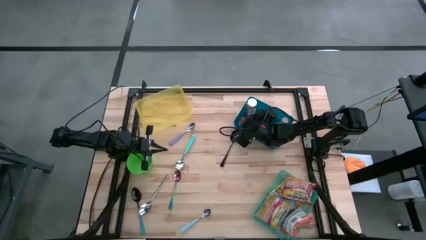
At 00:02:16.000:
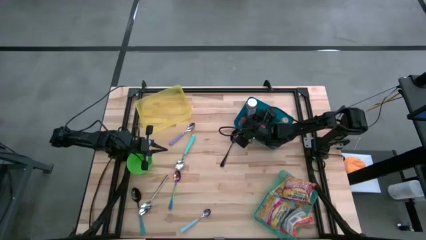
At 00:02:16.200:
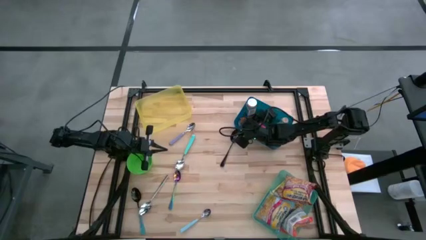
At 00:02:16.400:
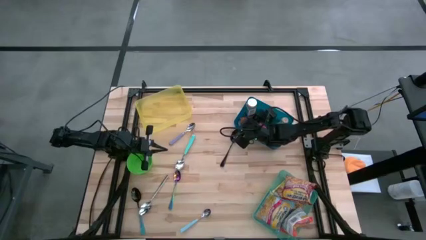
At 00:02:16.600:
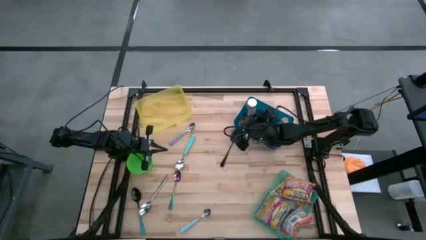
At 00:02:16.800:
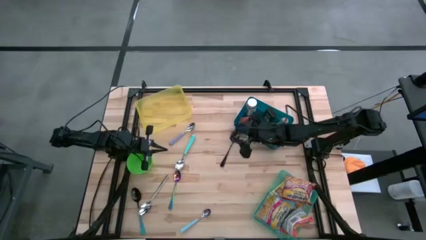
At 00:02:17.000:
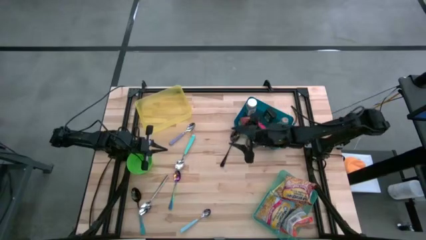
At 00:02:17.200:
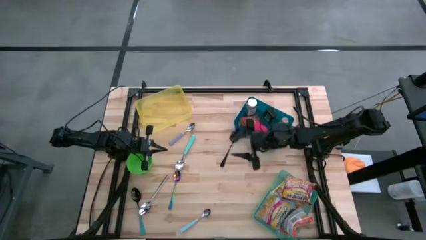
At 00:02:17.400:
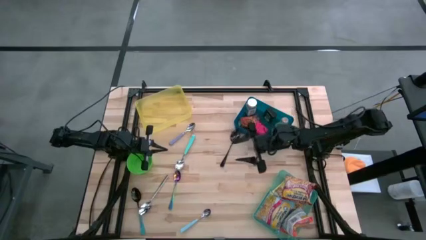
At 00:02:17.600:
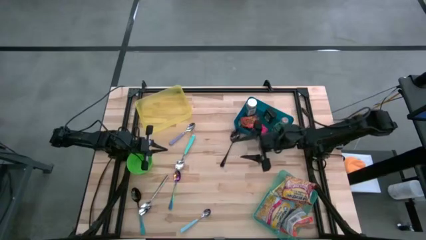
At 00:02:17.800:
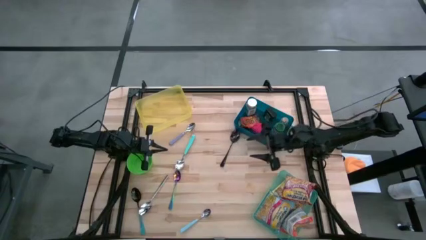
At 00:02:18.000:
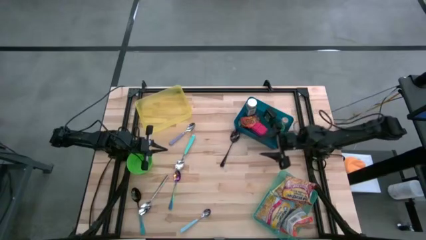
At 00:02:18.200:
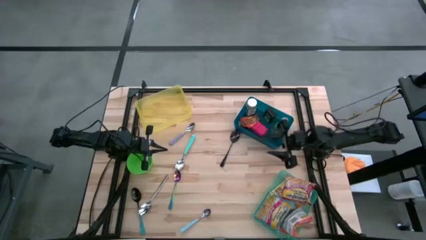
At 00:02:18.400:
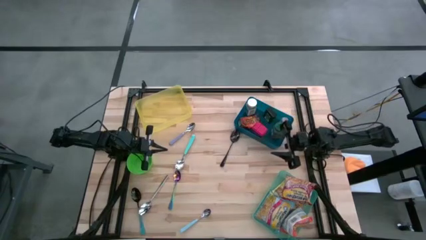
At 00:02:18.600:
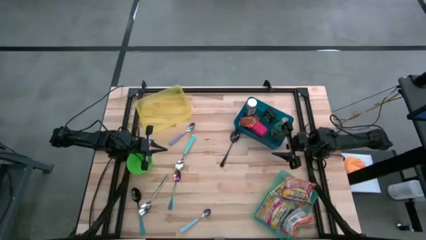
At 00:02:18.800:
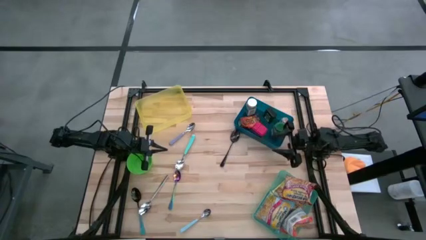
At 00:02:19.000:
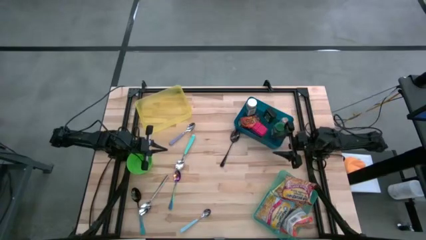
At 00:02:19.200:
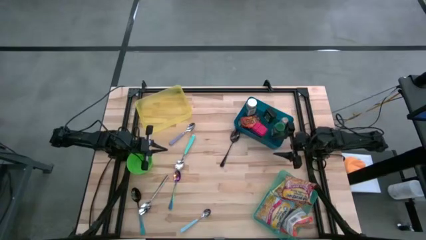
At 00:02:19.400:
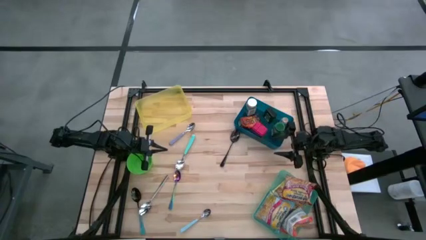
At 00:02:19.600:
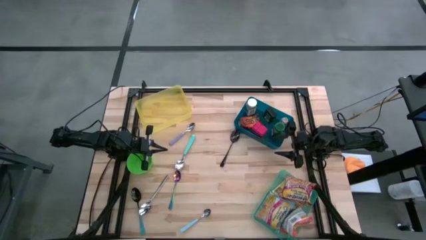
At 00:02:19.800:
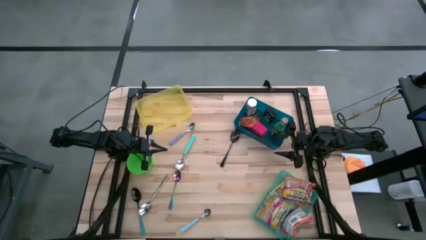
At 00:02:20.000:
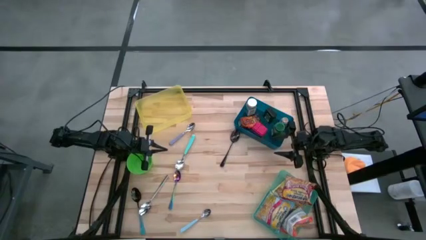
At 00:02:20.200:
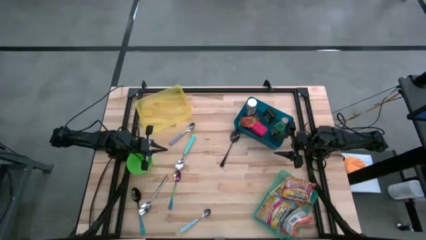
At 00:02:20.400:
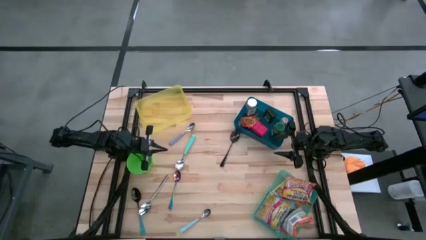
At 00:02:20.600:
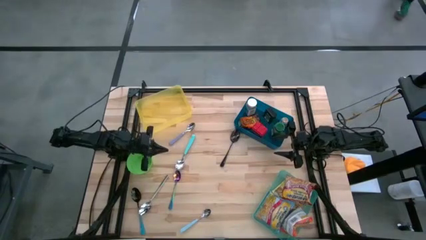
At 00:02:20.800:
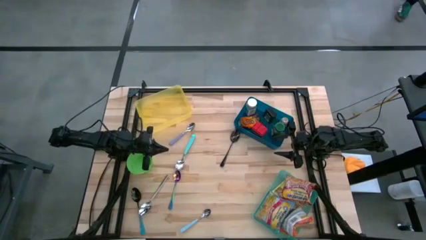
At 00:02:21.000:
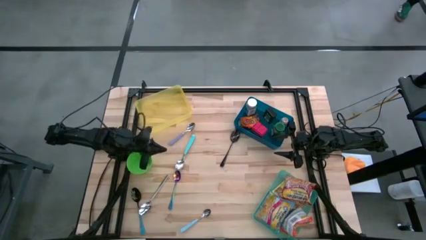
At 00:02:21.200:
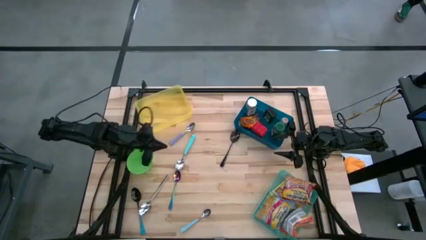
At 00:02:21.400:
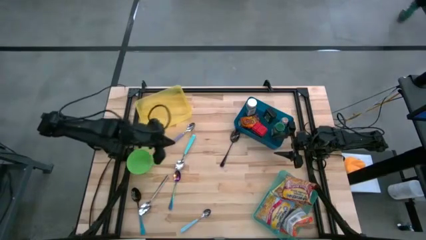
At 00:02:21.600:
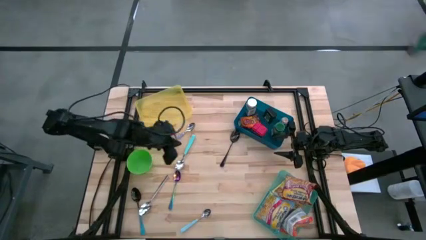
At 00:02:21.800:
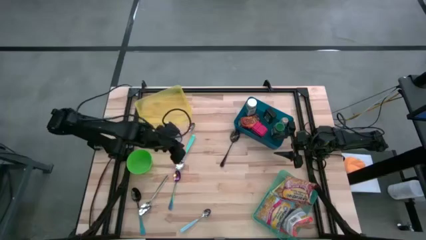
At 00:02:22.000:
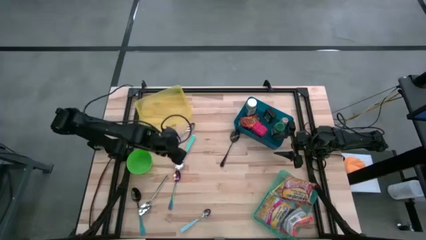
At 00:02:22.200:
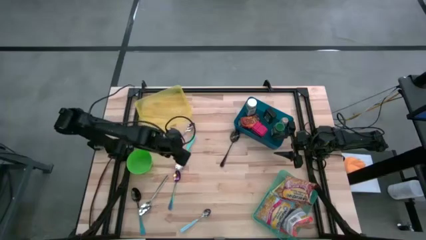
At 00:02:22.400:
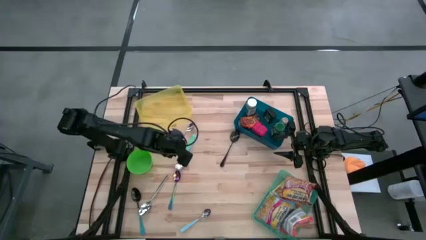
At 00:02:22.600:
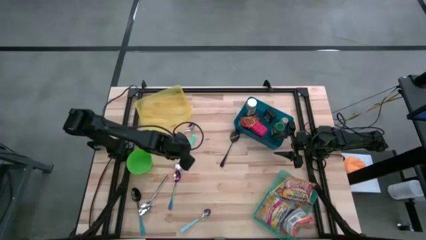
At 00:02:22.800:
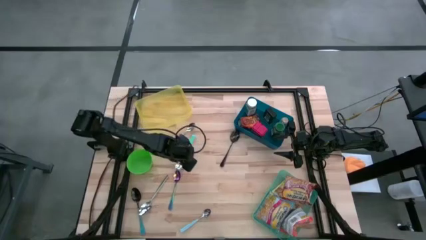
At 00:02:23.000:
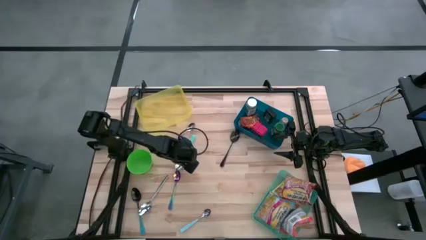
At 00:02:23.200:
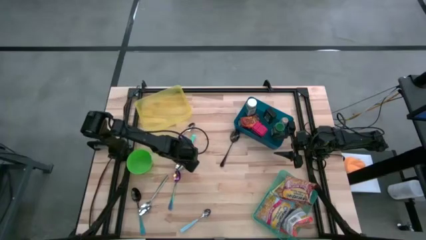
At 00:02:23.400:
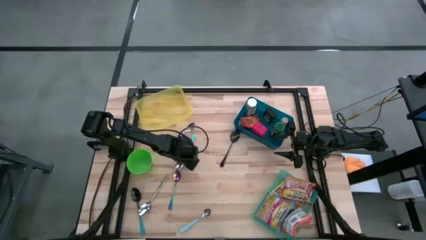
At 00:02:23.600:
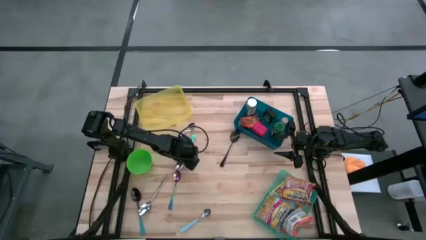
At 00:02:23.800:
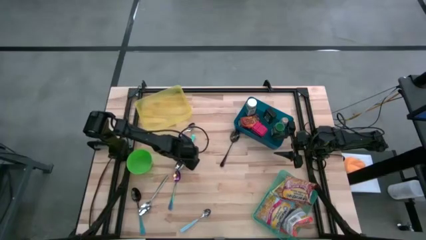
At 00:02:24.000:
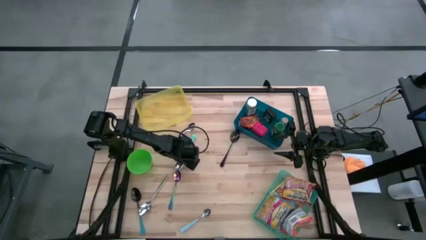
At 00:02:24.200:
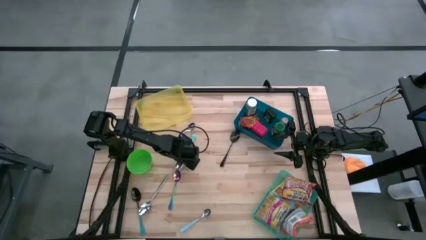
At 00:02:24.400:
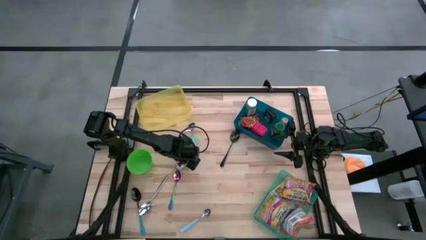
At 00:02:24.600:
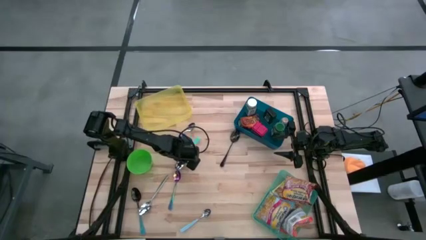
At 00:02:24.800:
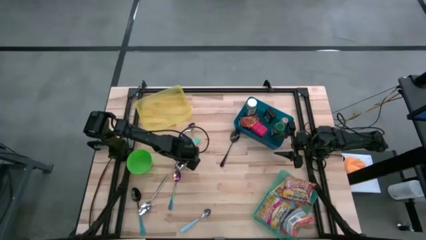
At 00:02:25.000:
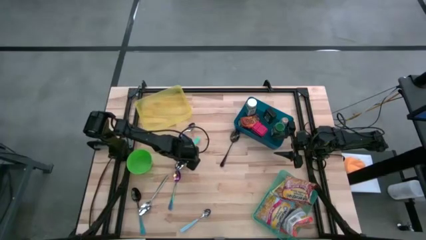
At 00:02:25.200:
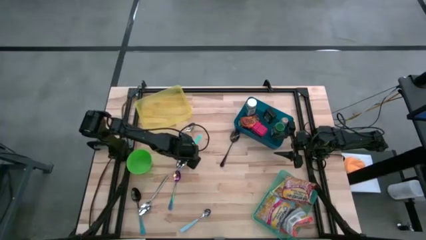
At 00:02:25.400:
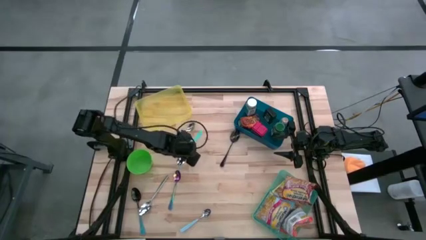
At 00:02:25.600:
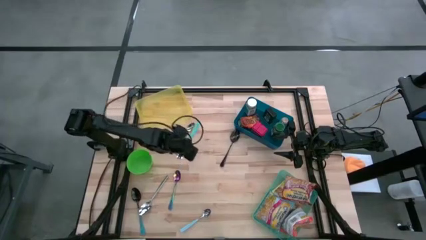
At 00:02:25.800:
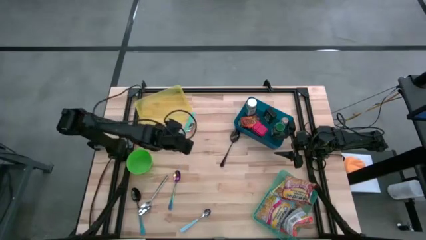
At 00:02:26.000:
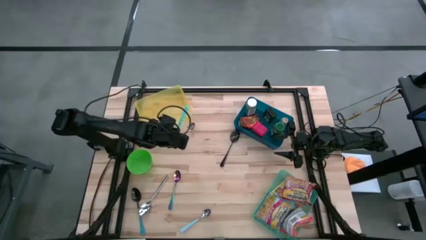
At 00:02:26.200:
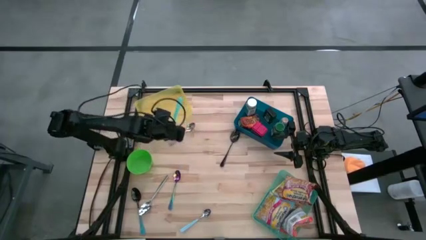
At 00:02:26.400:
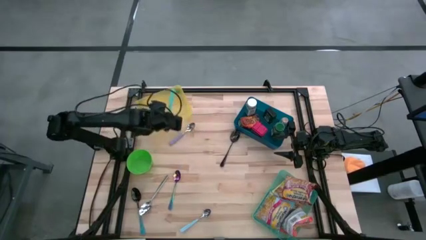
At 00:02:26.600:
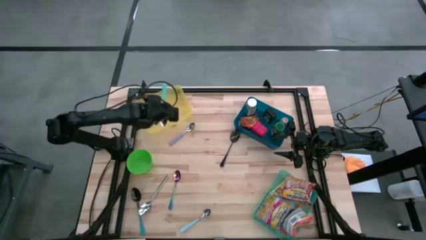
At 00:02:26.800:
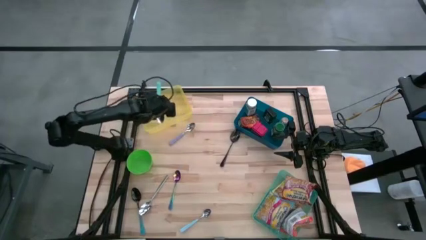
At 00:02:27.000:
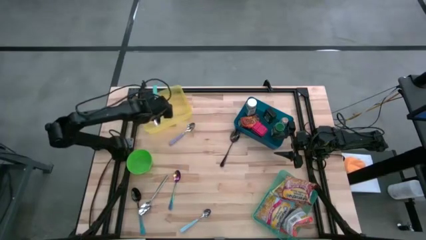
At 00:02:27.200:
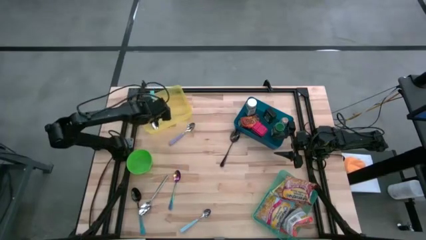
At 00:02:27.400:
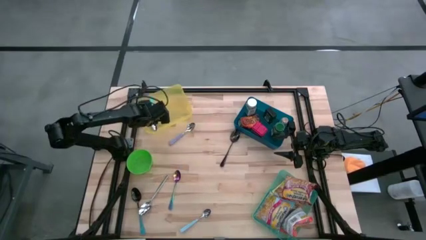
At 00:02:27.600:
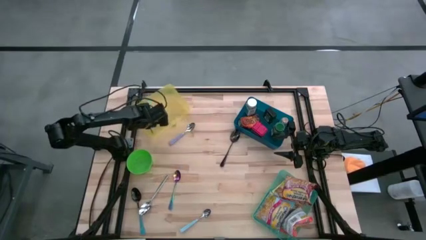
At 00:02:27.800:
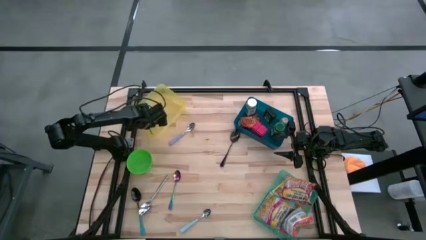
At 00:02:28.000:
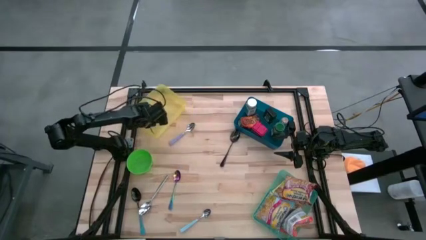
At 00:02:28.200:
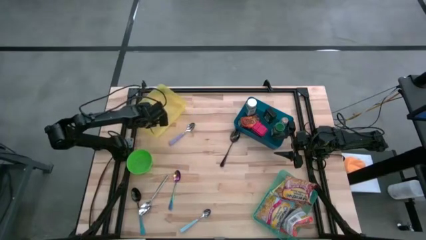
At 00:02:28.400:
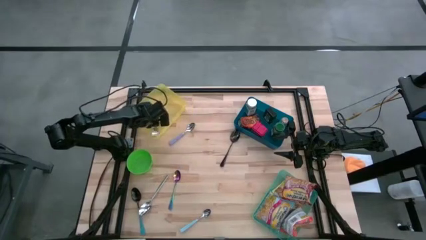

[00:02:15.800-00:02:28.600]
Put the light blue spoon into the yellow bin

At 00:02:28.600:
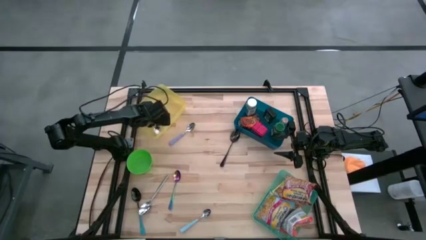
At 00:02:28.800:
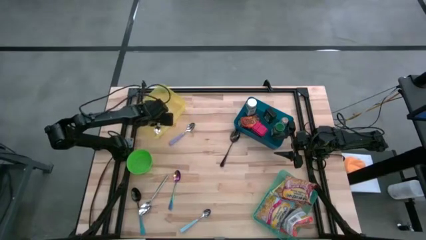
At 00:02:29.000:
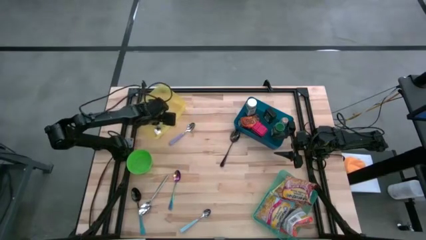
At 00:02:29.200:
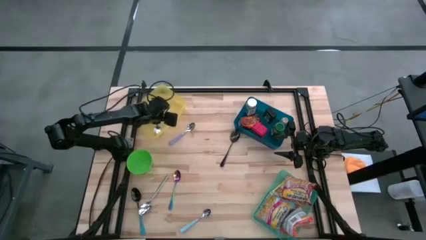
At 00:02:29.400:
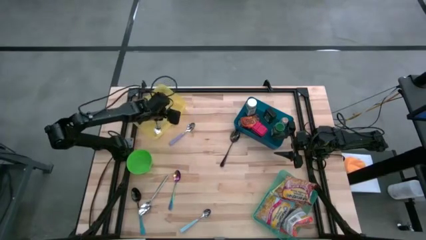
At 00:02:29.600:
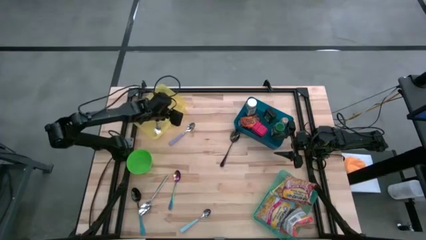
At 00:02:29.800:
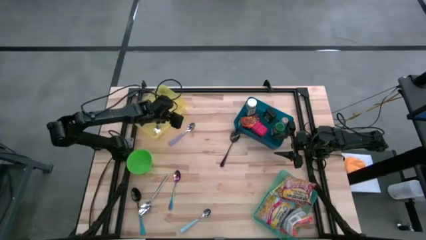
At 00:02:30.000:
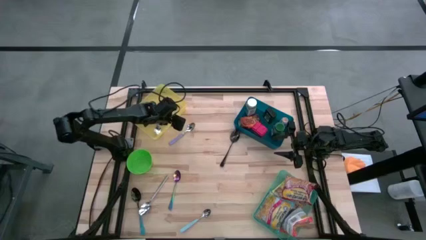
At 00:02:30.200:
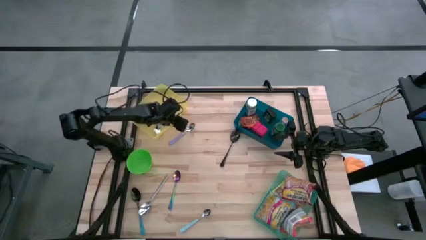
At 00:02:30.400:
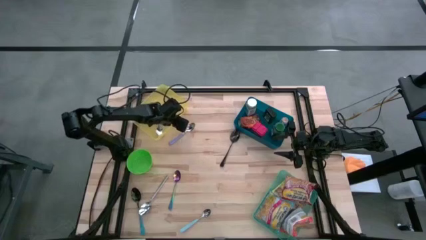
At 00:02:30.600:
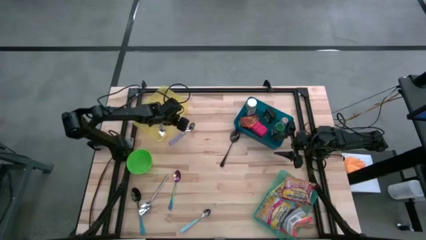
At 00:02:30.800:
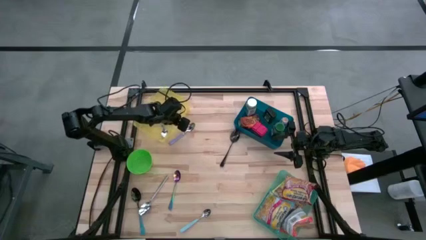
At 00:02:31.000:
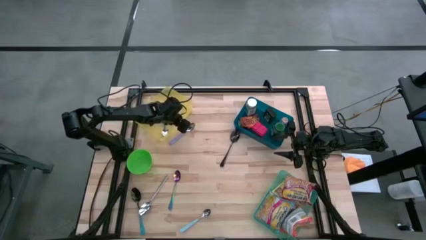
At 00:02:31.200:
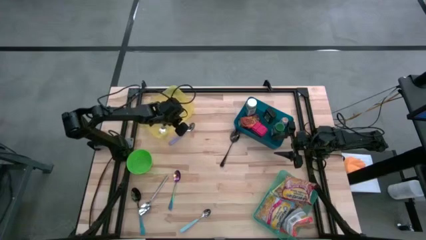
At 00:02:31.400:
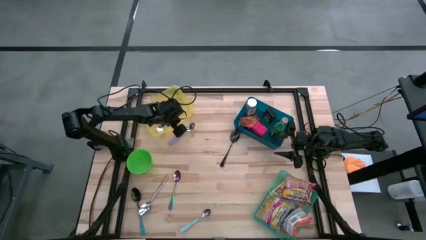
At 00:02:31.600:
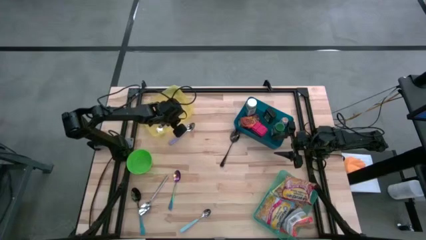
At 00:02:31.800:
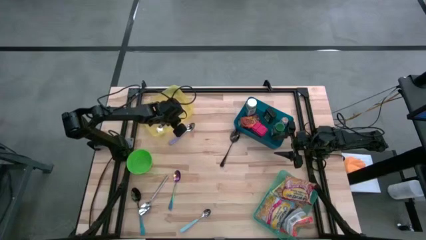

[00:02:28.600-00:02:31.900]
Adjust the yellow bin on the table
